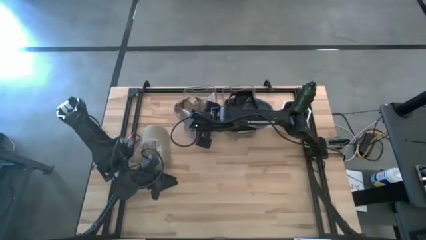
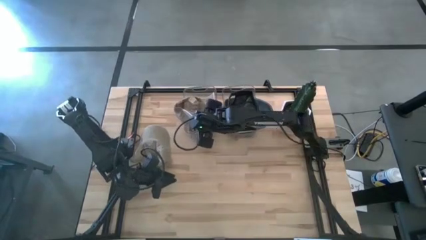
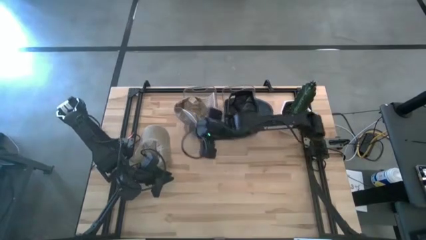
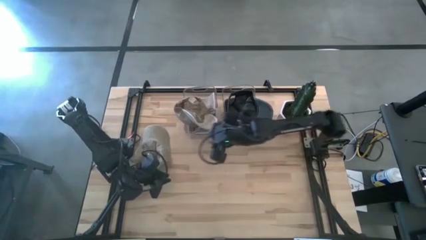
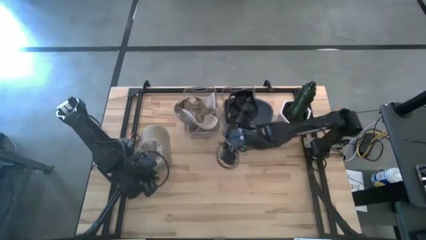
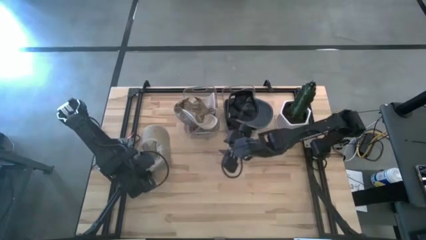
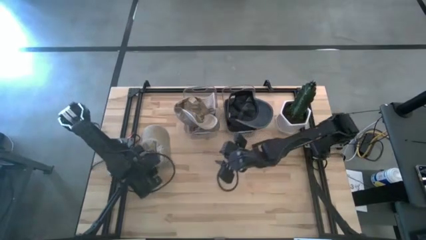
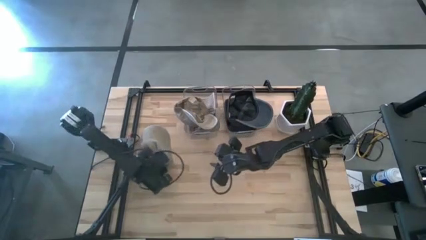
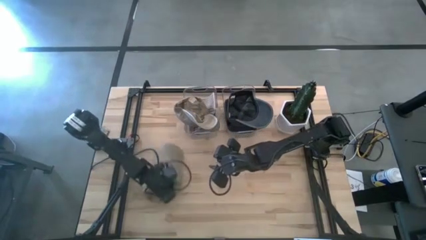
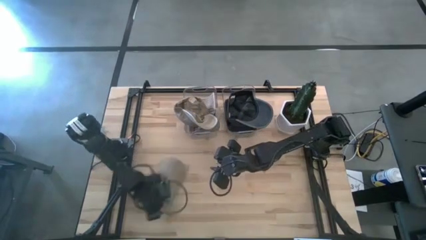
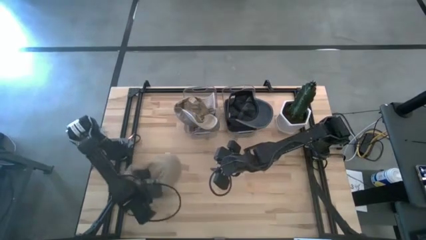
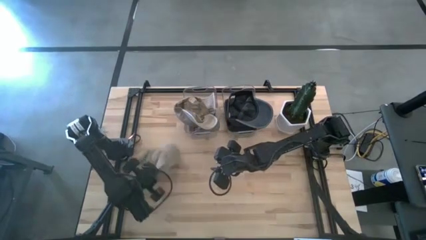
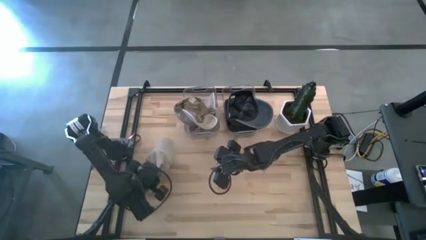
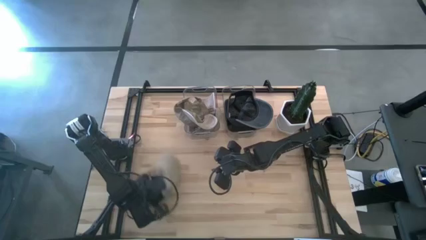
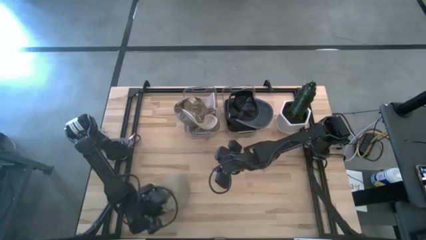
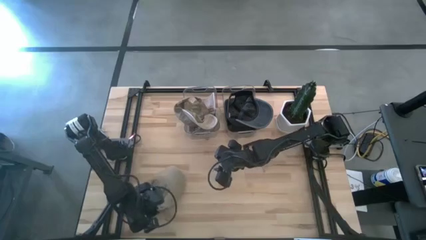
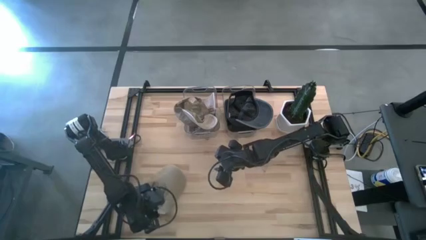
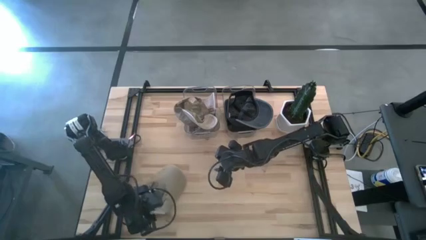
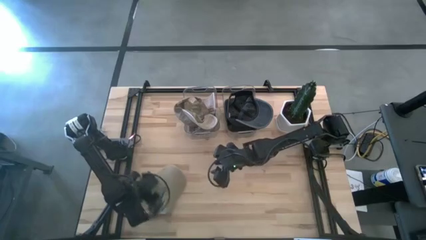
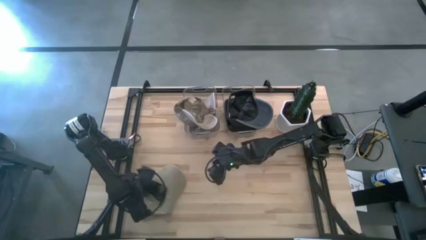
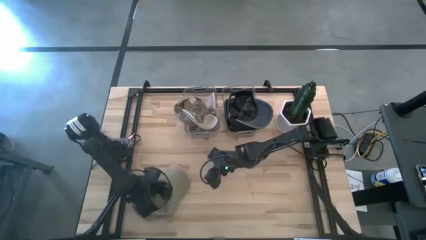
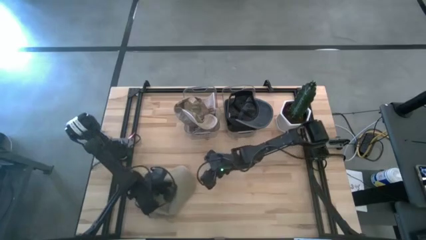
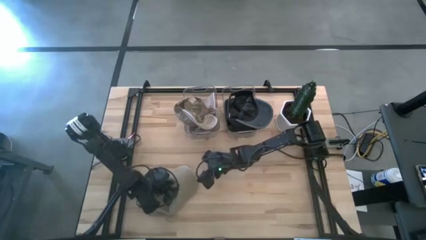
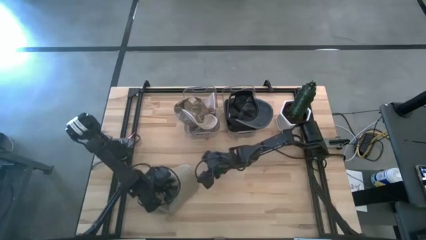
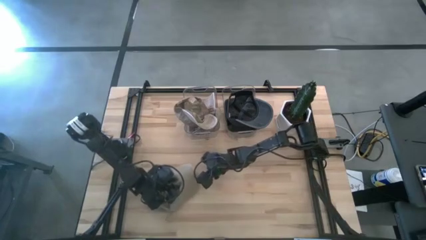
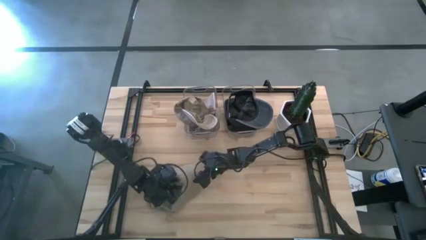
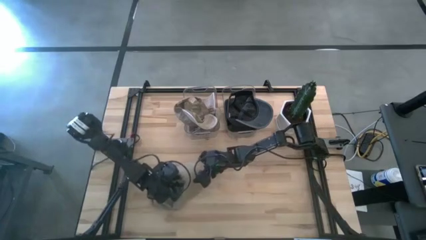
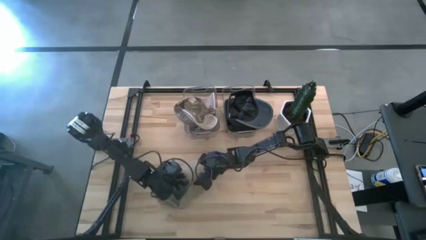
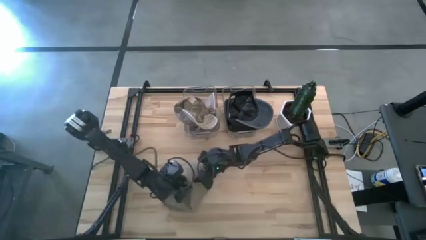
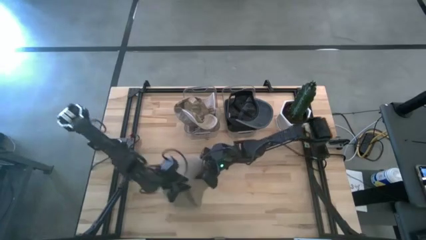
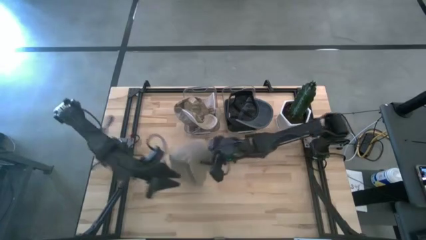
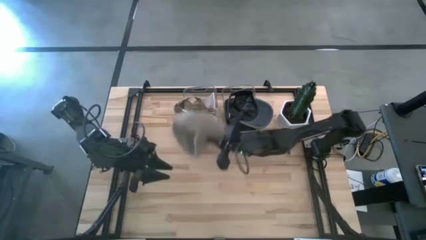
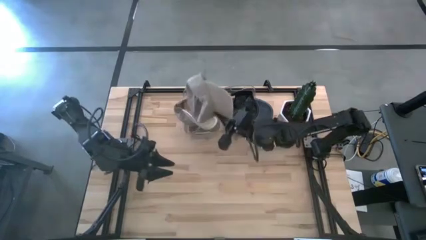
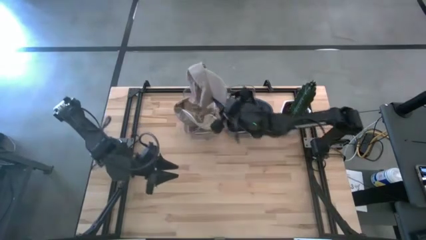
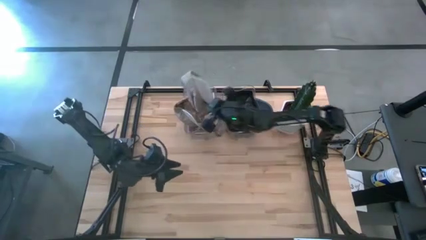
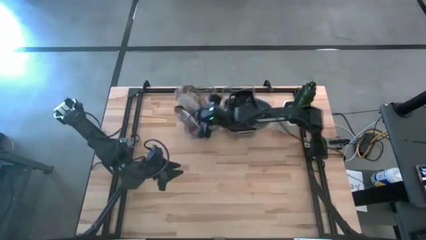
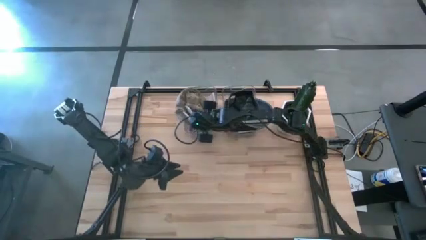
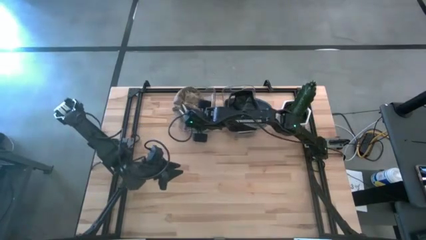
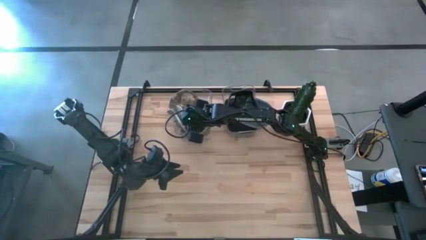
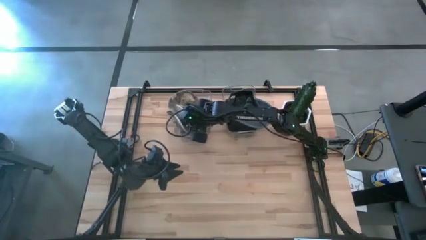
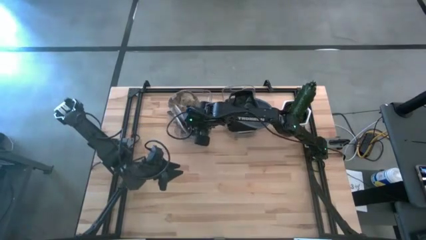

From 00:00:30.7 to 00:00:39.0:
Task: Pick & Place hat
Put the brown cap into the left transparent bin

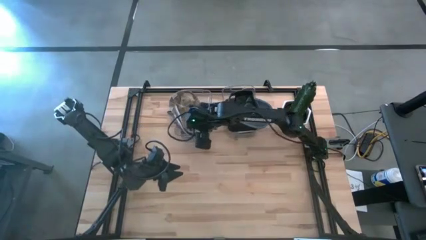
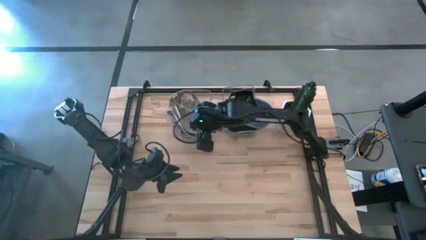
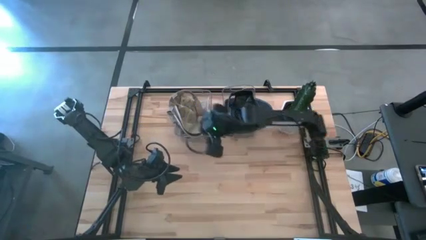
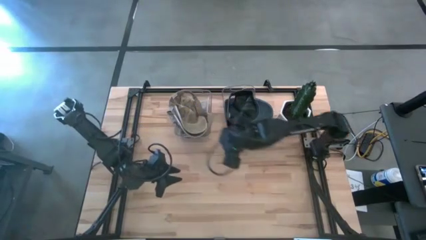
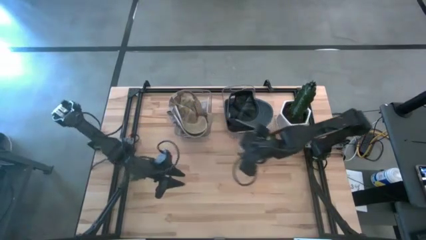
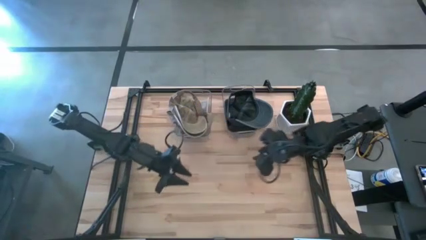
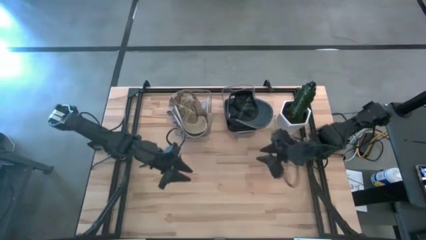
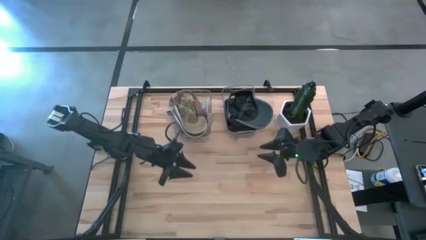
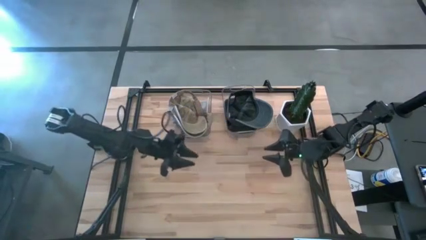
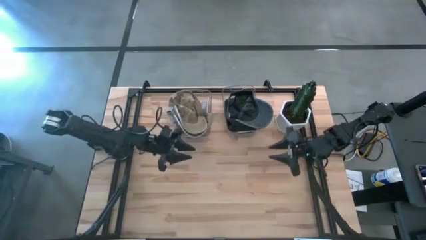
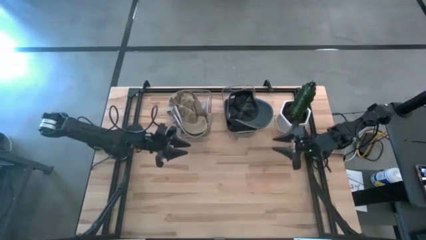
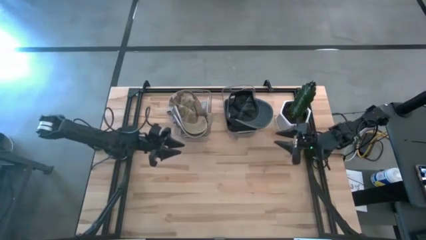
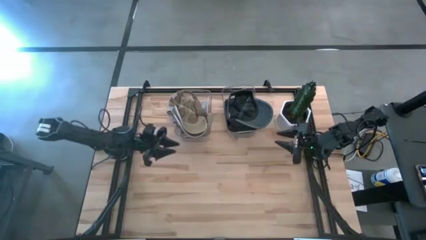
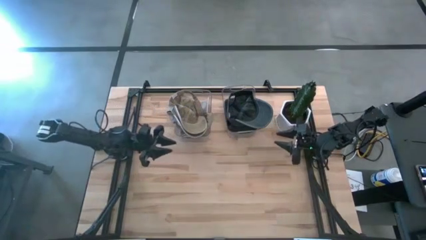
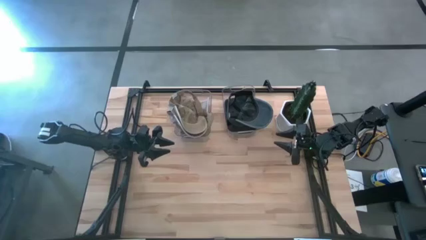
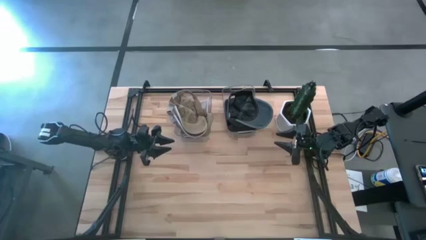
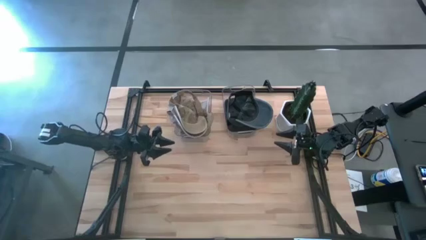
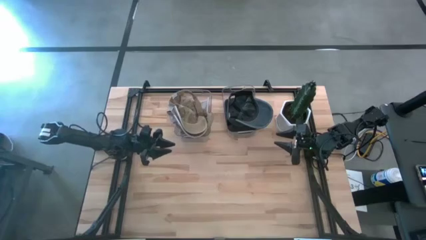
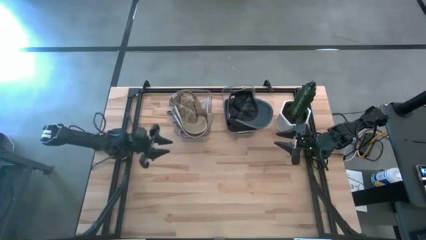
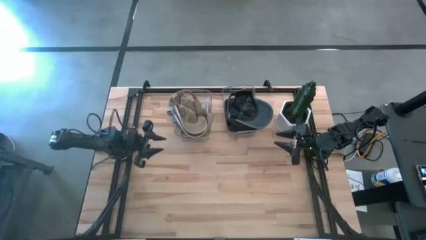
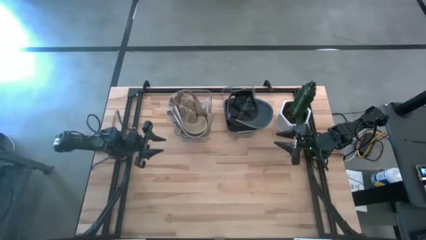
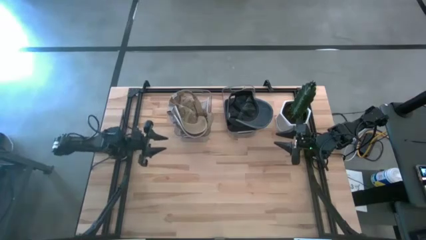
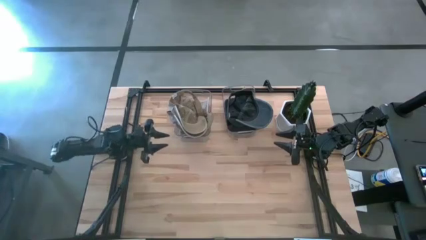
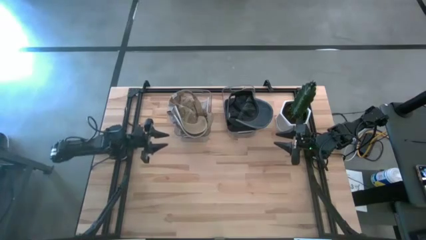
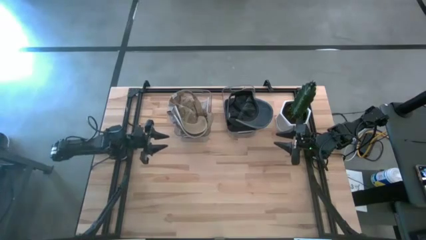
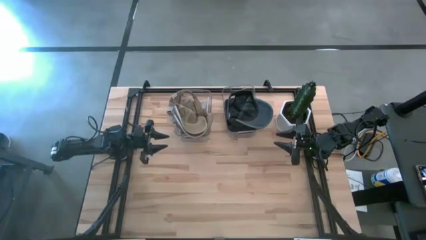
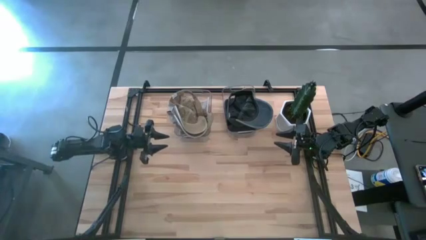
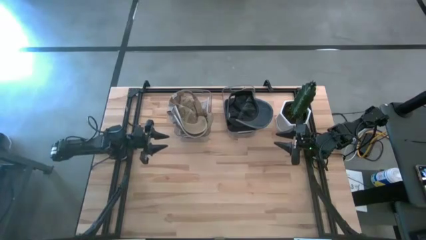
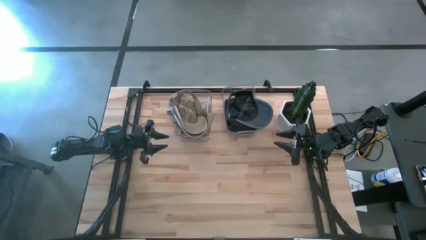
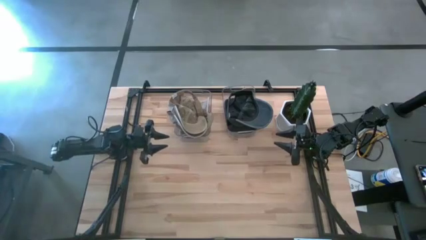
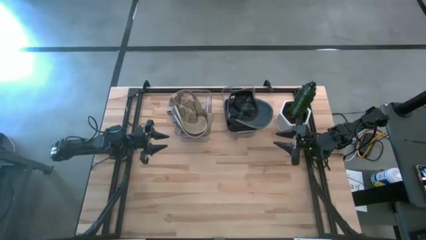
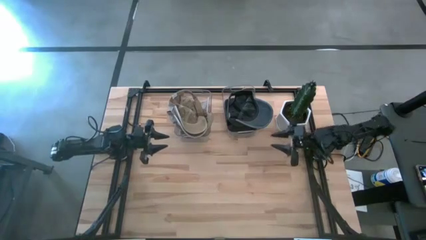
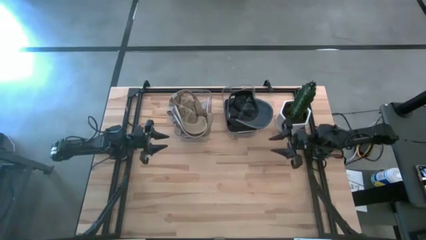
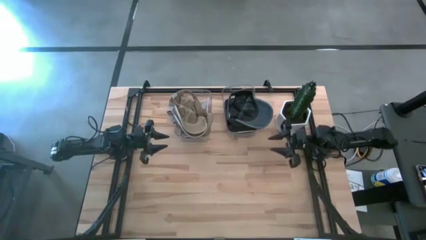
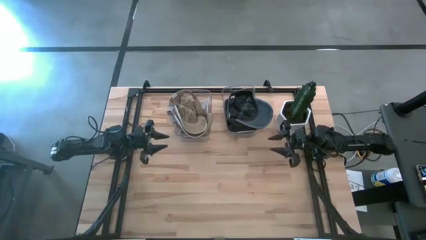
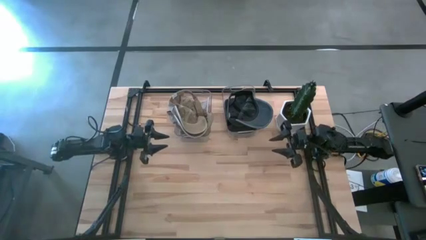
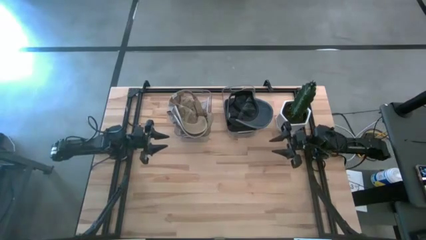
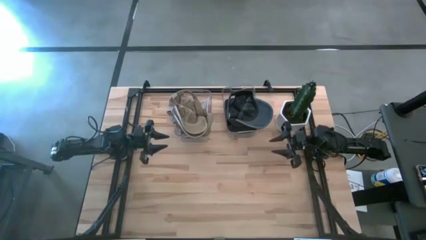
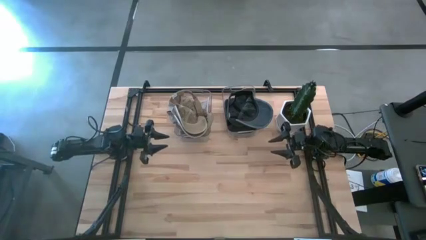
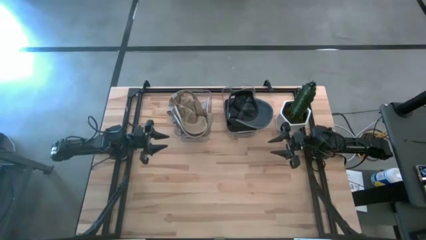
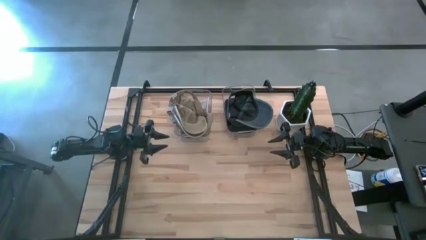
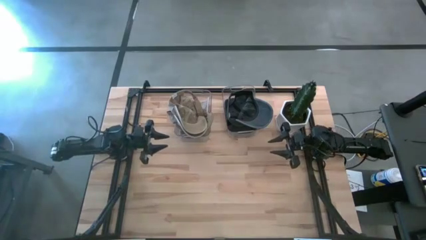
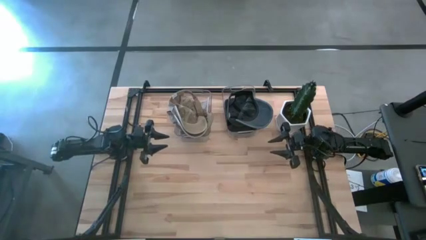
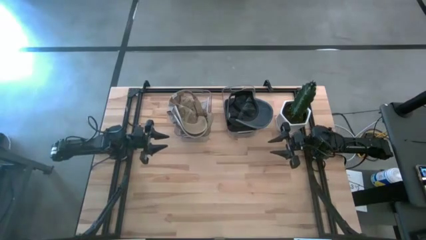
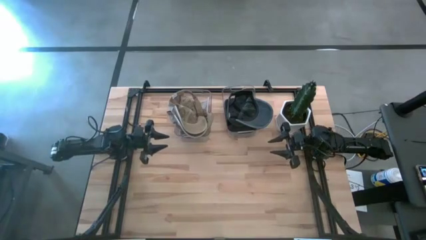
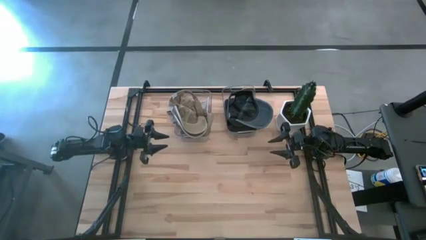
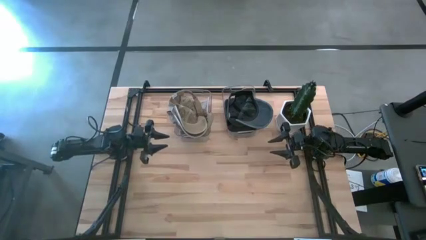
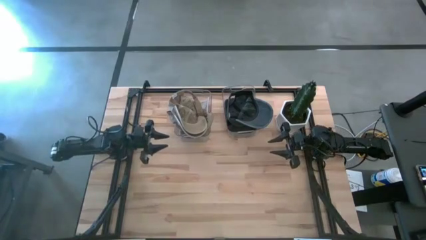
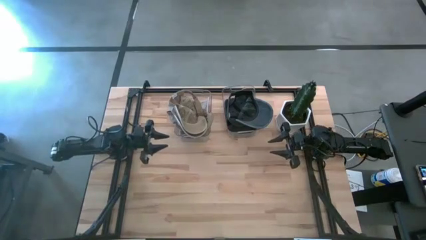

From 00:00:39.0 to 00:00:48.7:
Return to Home Position
